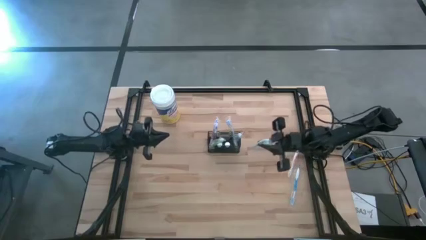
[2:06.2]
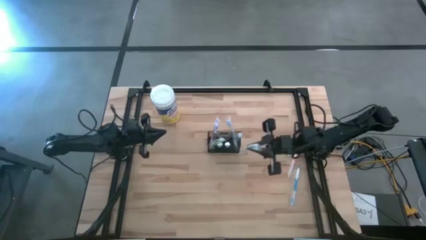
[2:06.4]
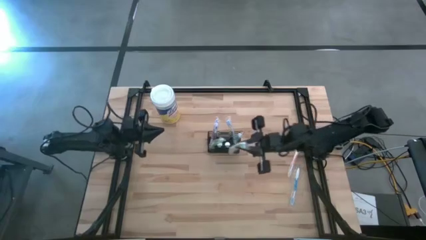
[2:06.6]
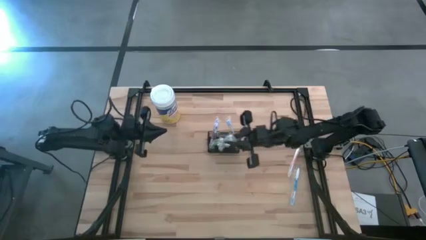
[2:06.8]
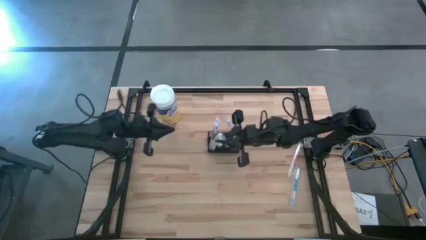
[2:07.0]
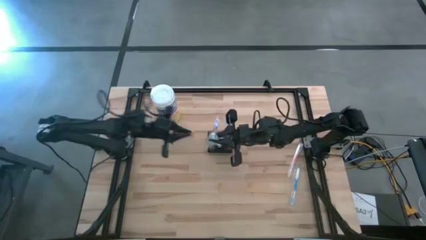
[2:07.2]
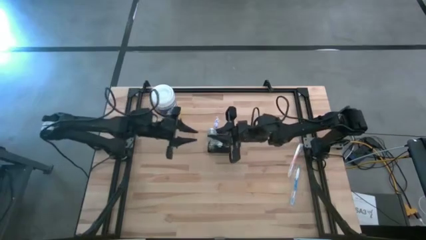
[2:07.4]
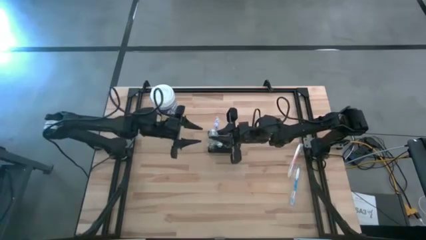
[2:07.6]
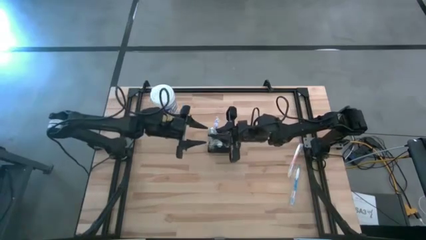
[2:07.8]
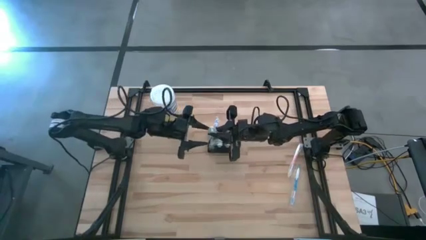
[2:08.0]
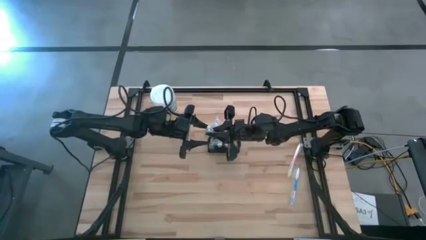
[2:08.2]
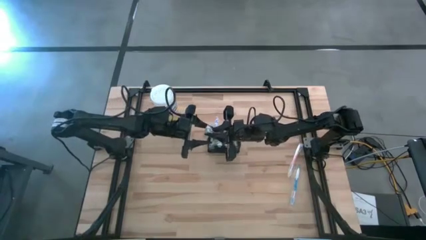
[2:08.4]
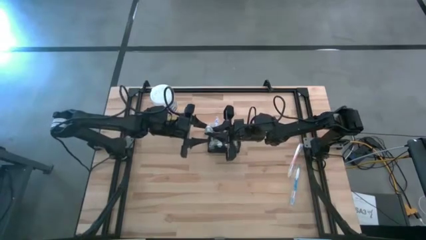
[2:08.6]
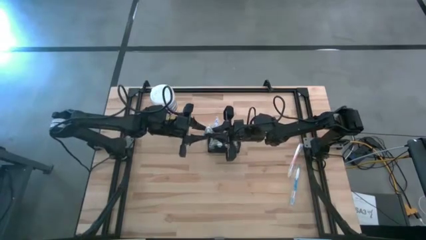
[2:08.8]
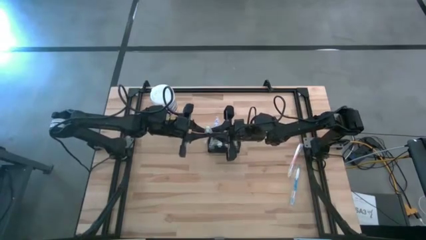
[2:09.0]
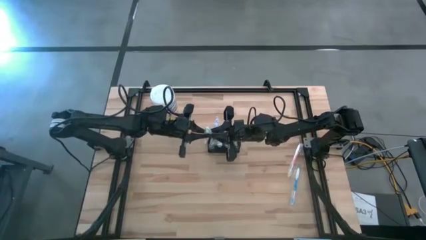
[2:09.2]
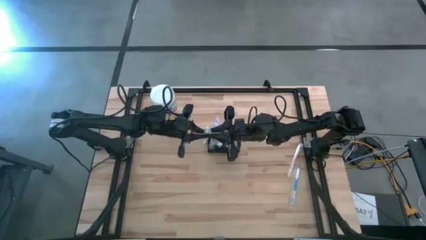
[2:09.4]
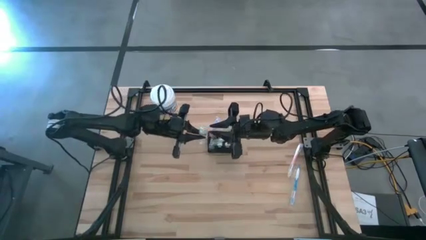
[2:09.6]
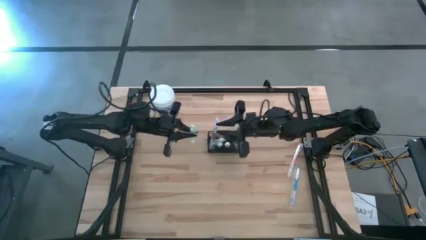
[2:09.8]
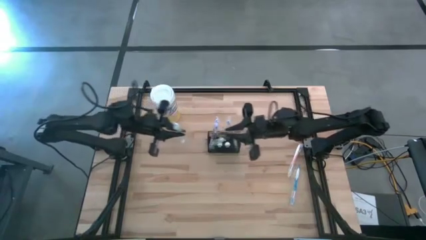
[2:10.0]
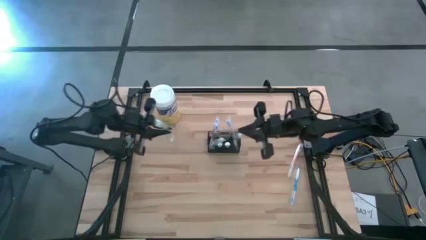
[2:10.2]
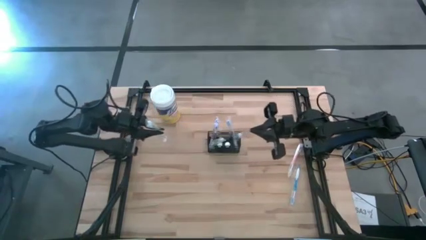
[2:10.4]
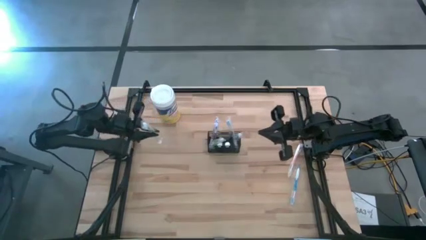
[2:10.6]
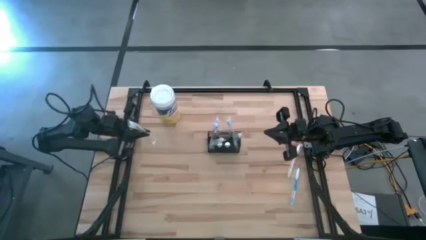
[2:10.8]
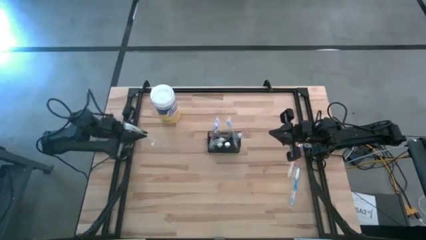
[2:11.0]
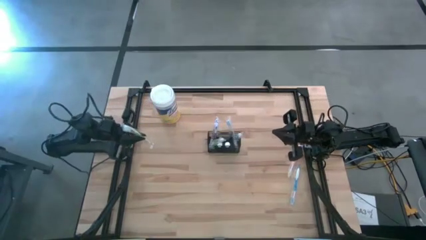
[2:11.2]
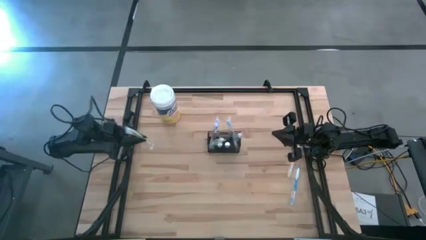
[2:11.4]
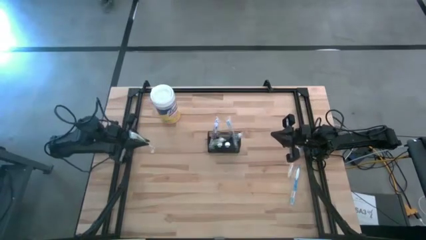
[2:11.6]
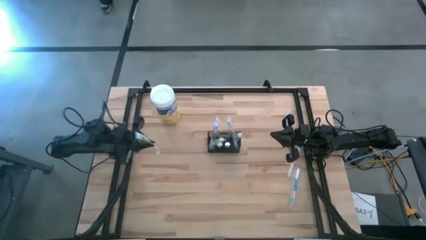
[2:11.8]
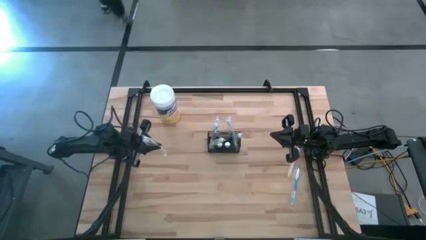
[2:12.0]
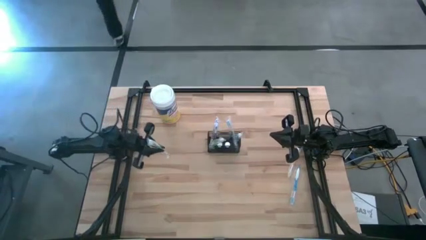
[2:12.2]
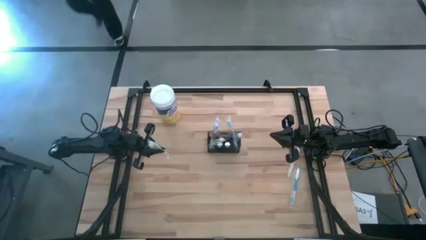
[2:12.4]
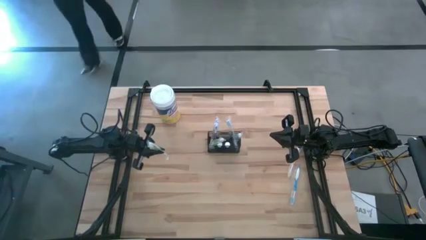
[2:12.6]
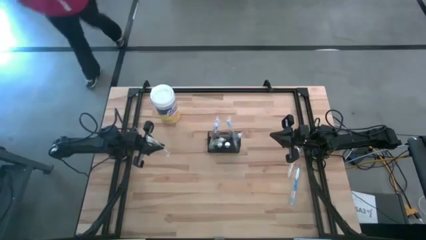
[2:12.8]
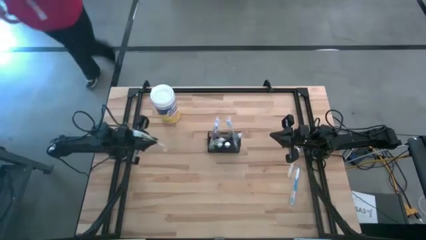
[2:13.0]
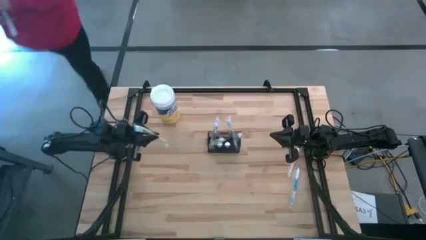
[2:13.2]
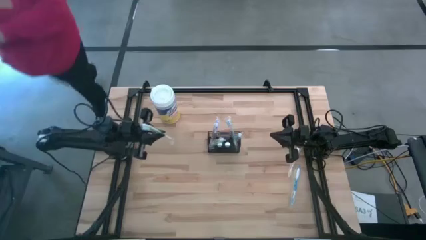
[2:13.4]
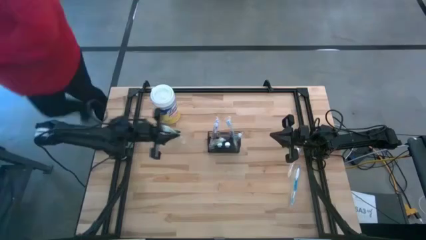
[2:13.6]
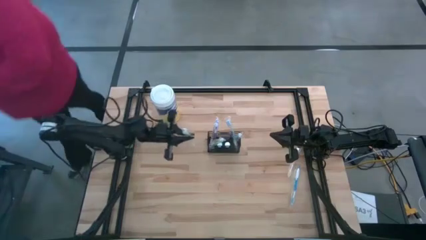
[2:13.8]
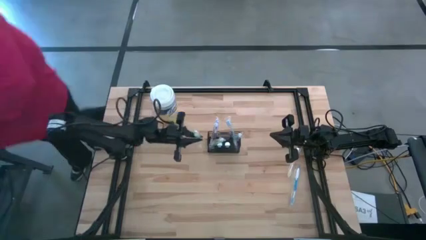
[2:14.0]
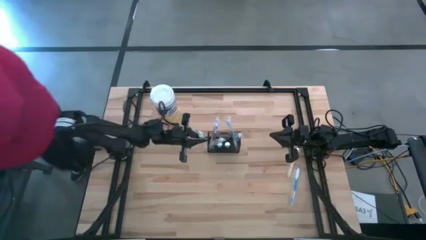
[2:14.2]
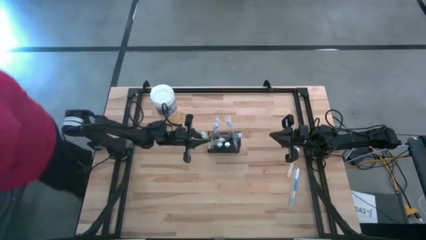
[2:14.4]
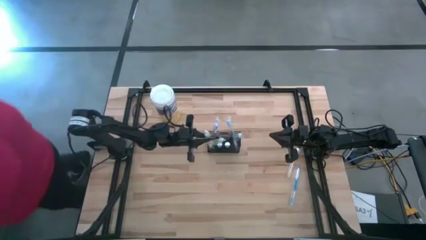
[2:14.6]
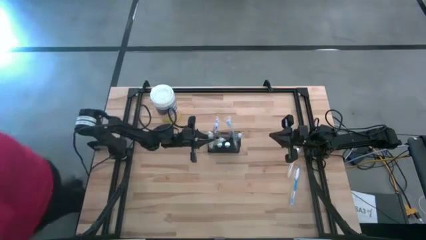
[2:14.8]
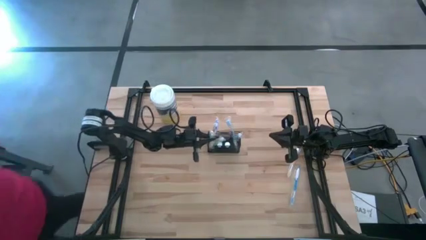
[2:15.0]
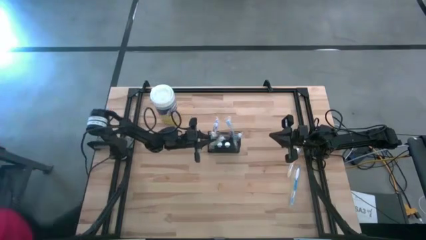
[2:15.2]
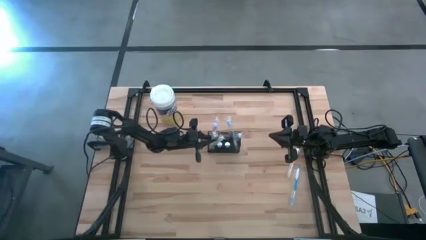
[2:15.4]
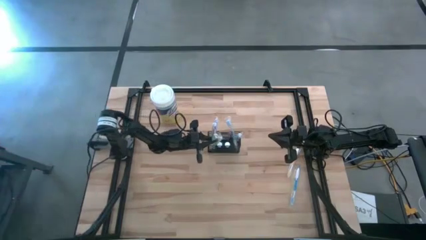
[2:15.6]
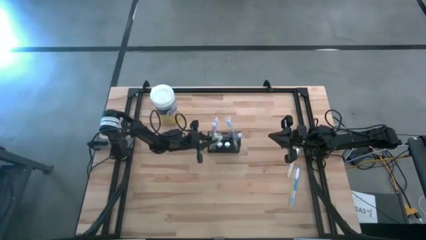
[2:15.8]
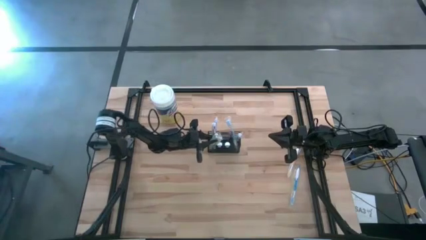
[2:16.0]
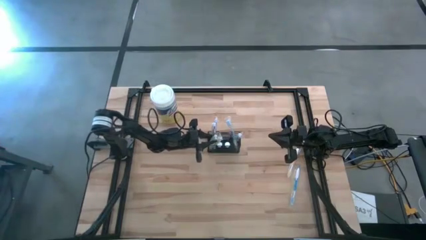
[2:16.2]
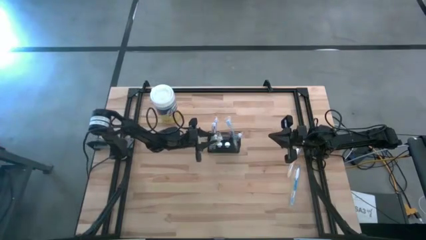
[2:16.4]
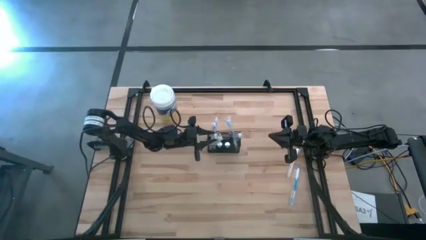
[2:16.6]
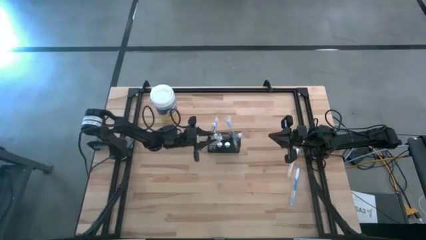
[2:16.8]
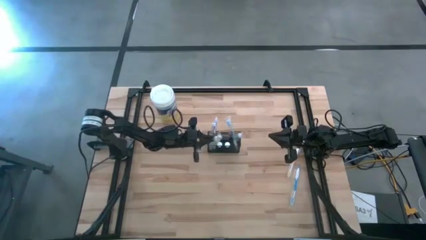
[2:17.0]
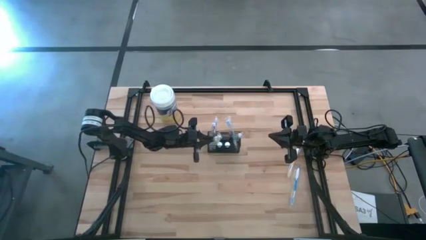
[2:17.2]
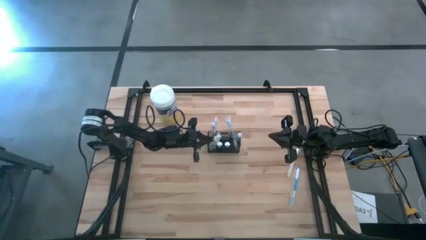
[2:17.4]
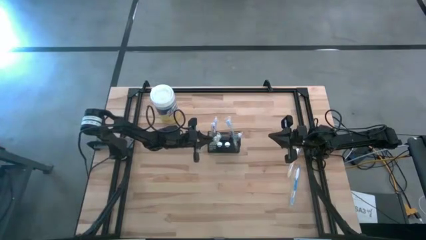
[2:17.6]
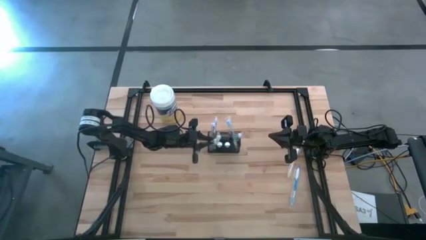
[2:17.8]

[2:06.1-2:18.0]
Task: Pick & Place toothbrushing station
Put the green toothbrush into the wire organizer

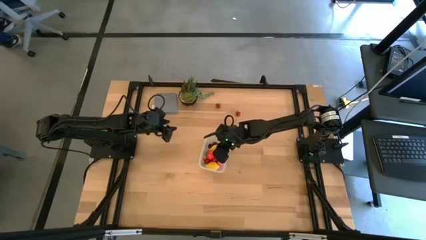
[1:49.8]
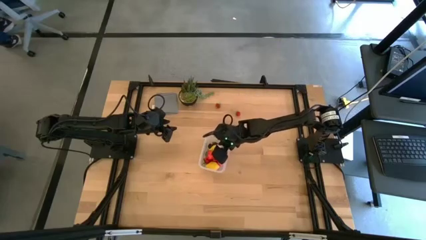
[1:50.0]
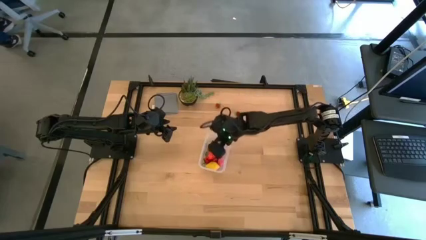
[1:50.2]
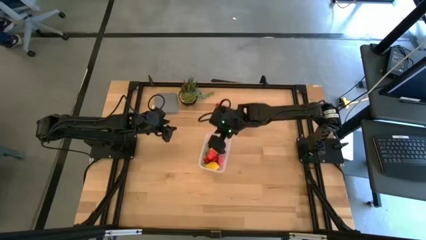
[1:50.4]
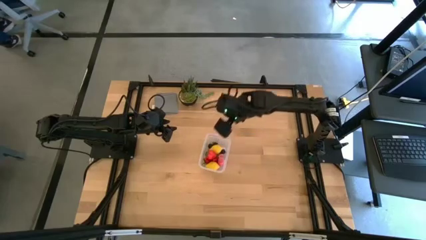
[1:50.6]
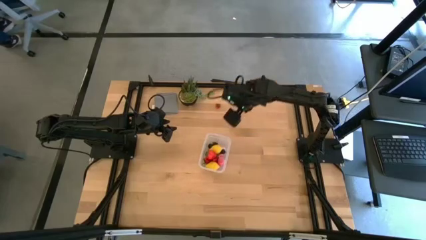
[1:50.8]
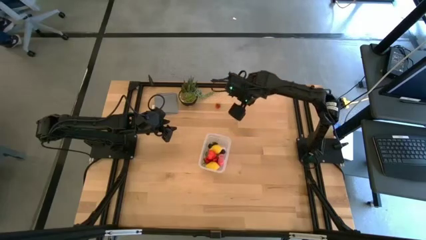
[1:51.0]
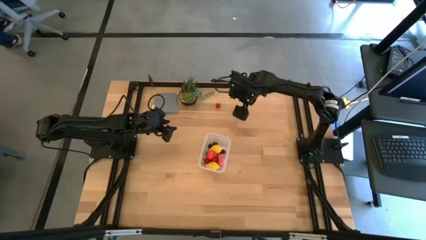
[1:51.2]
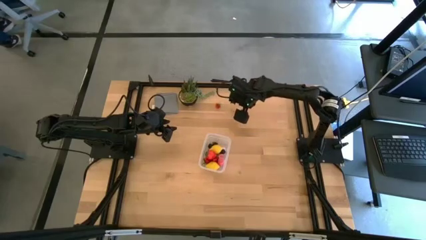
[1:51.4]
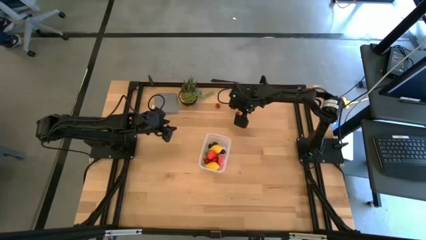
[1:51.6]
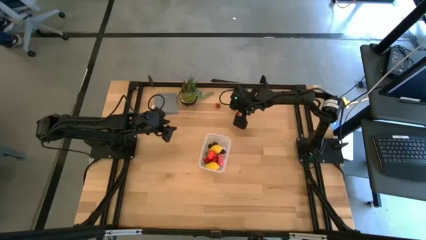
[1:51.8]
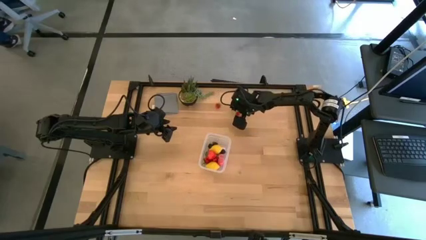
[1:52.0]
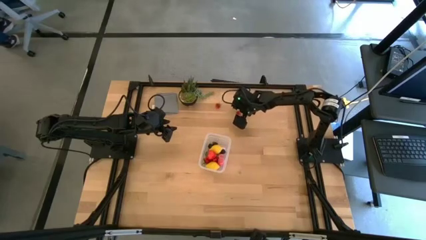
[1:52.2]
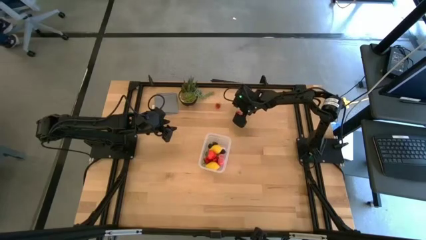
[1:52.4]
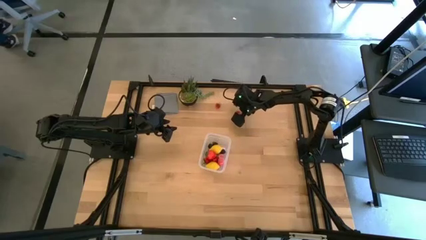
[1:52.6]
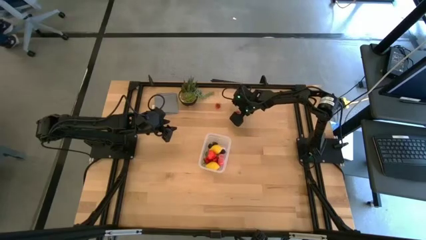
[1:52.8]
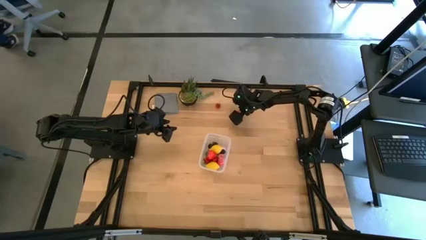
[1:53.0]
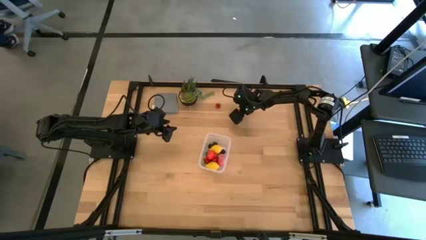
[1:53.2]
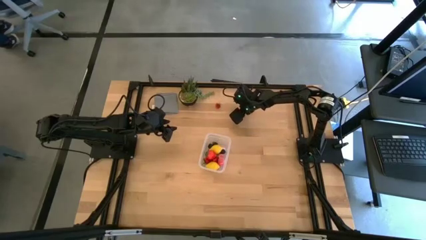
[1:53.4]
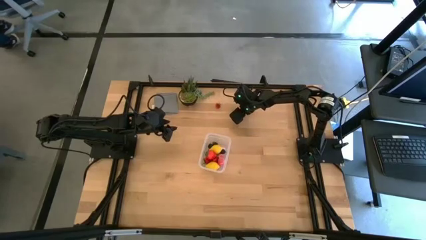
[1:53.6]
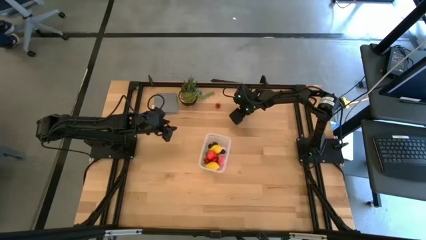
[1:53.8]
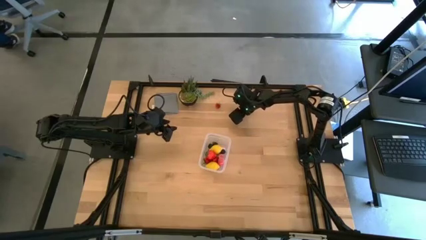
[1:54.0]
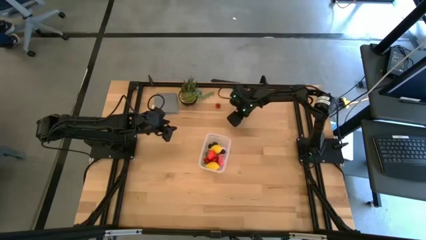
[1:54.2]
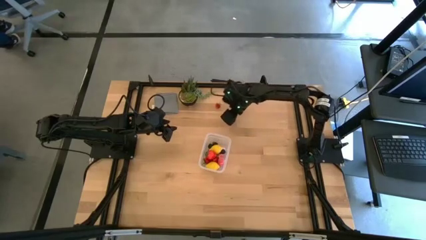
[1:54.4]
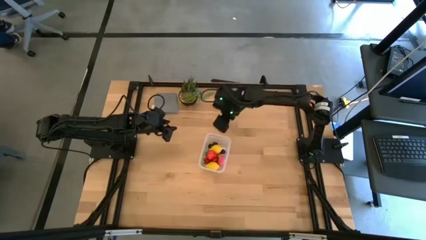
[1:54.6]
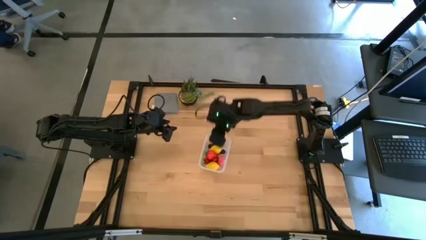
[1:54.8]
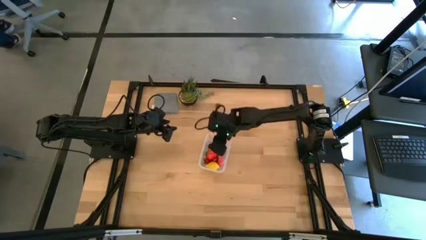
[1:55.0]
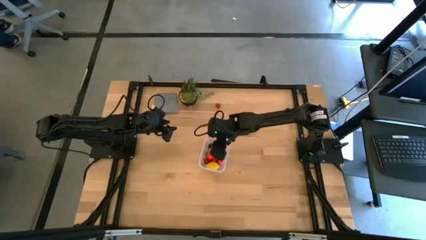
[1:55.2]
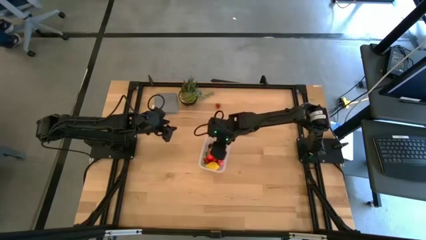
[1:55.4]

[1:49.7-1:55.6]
Task: Pick and placing Produce into tupperware
Put the red strawberry into the transparent bin
